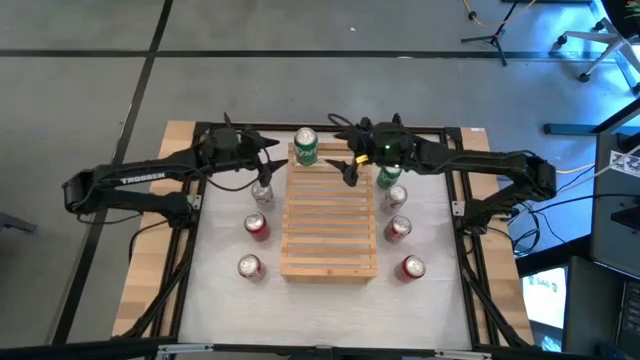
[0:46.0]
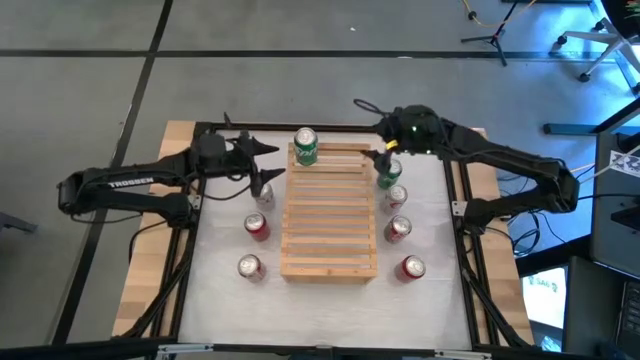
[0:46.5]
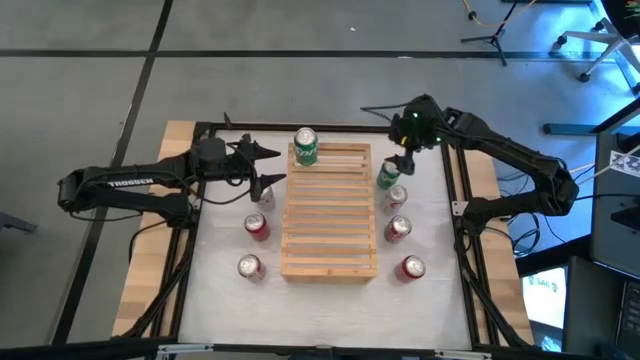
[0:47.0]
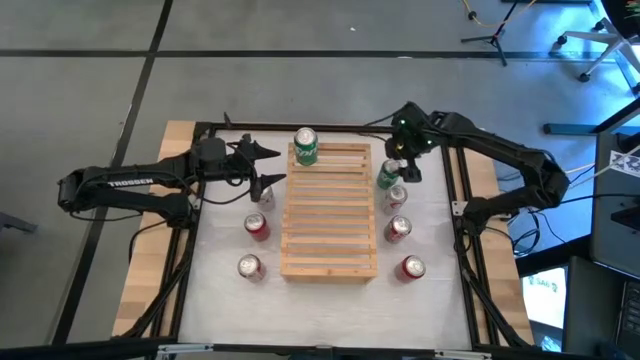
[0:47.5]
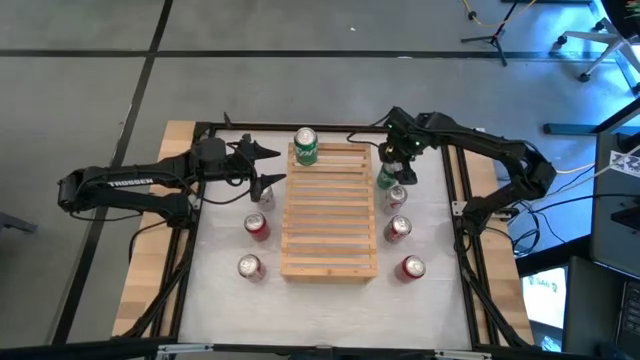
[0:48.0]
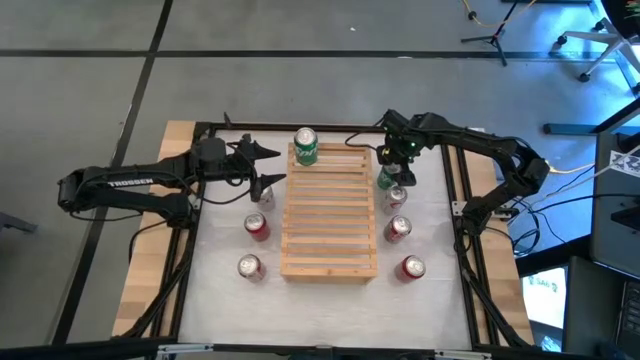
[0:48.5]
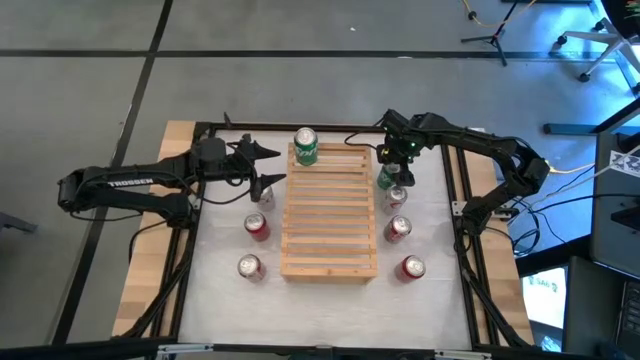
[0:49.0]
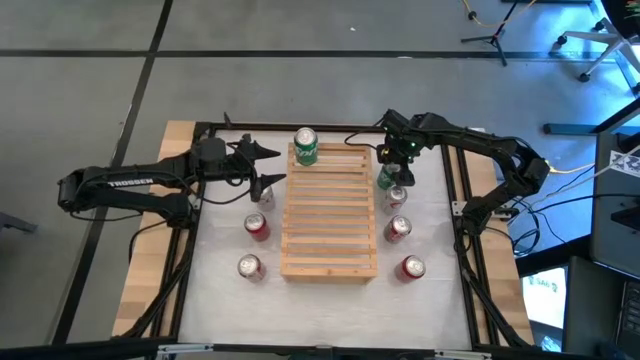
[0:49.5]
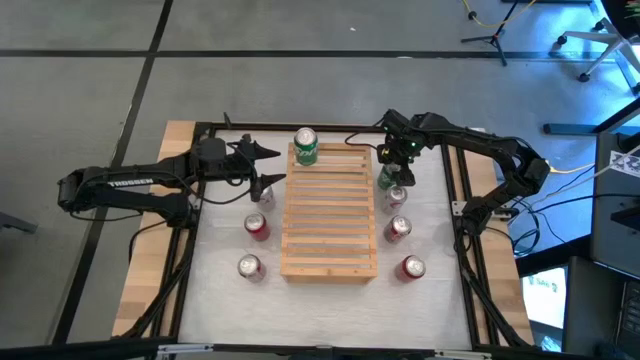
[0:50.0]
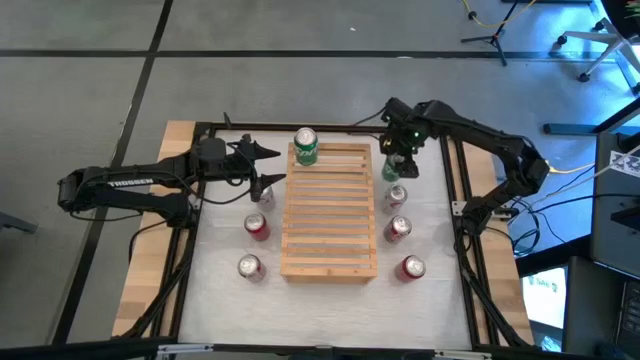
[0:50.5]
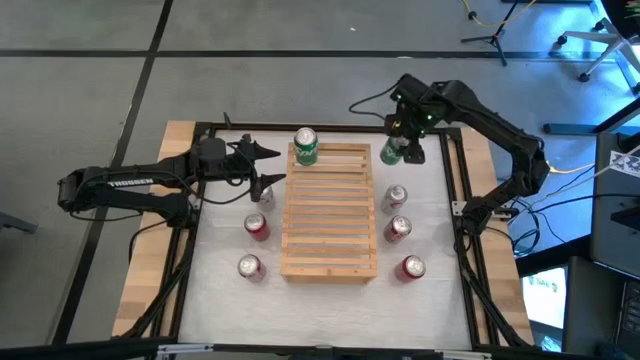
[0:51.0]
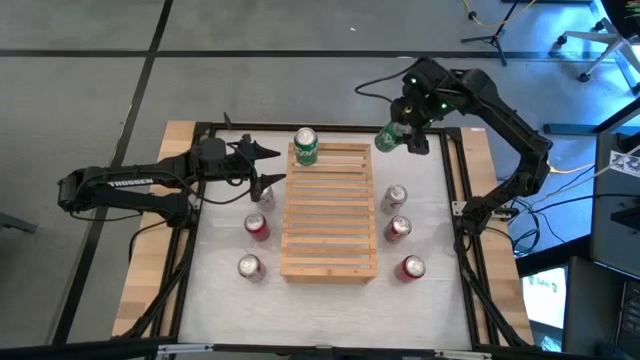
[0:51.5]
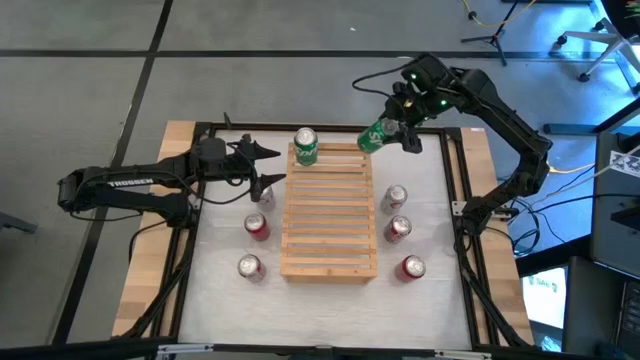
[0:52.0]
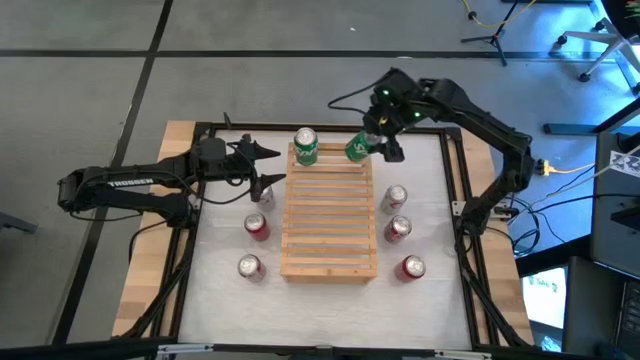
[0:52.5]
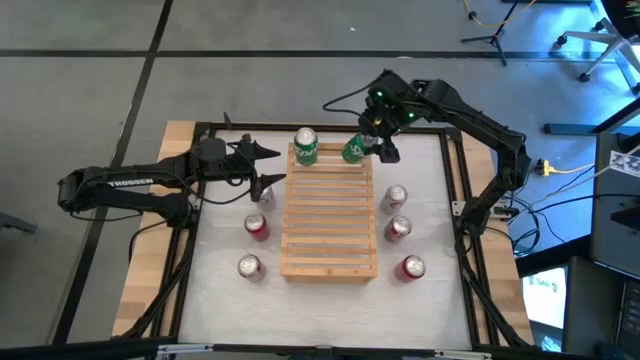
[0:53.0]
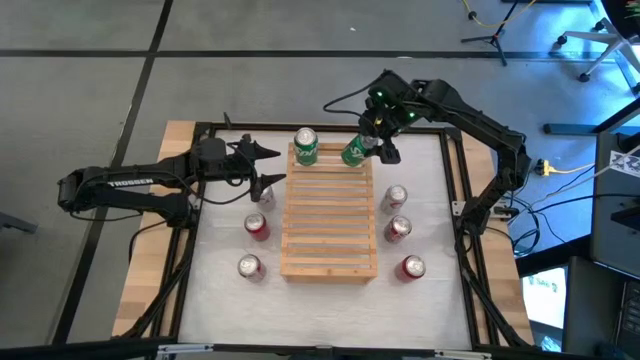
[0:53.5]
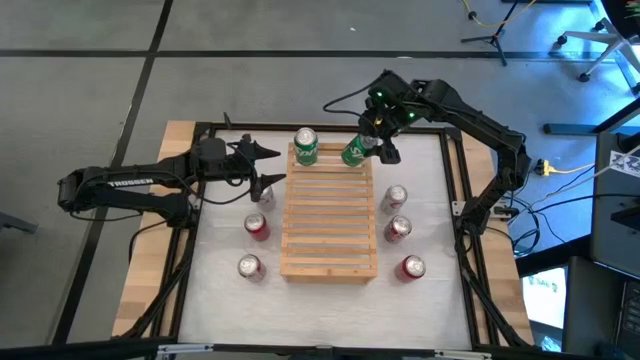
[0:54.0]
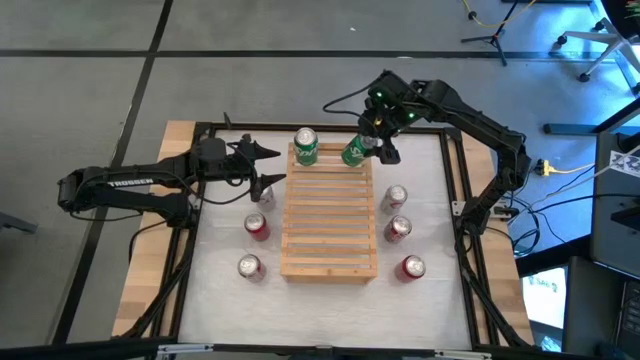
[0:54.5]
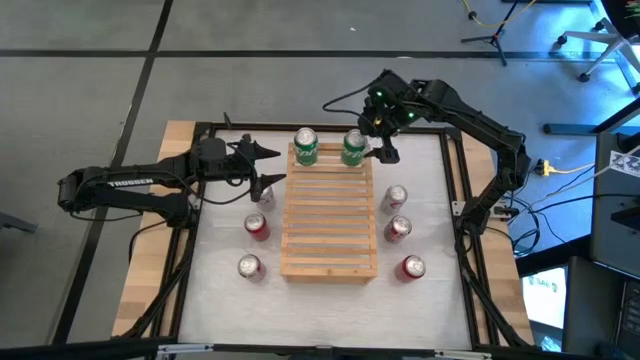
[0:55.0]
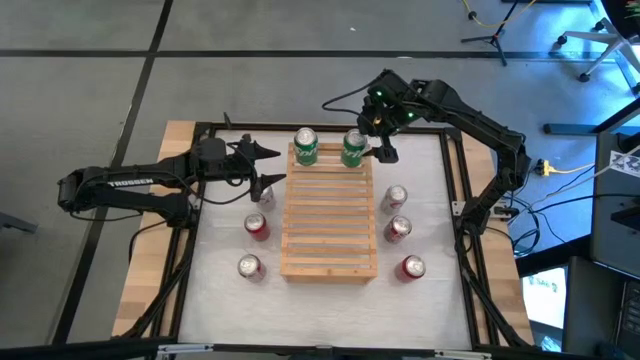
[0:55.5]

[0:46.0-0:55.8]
Task: Place canned beverage on shelf
Put the green soda can on the shelf aligned with the green soda can

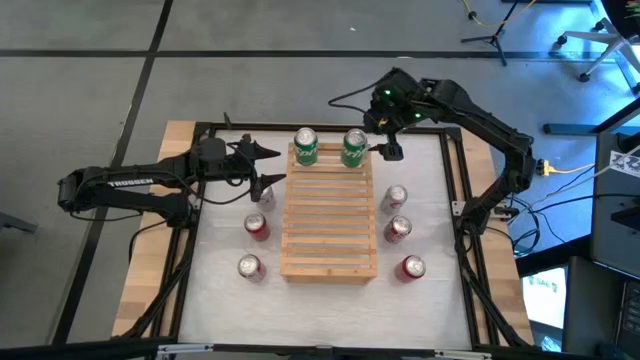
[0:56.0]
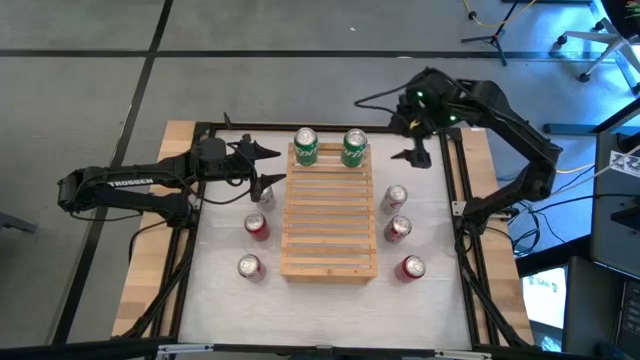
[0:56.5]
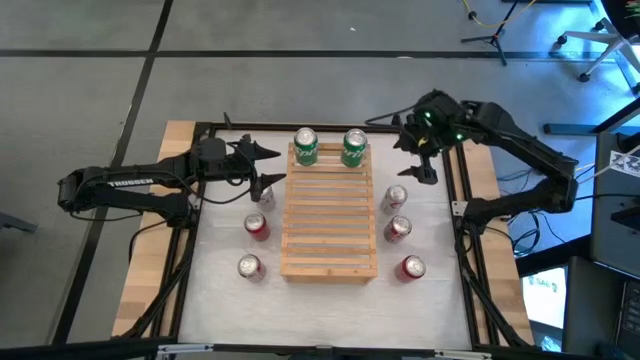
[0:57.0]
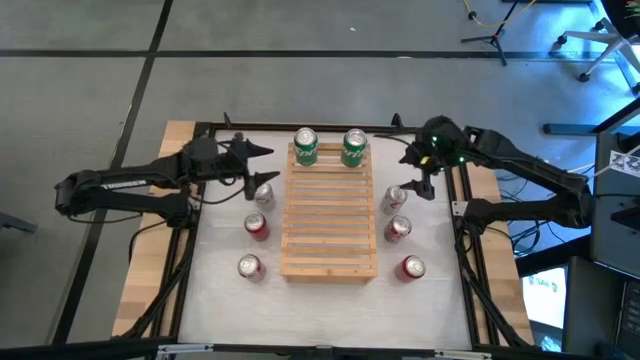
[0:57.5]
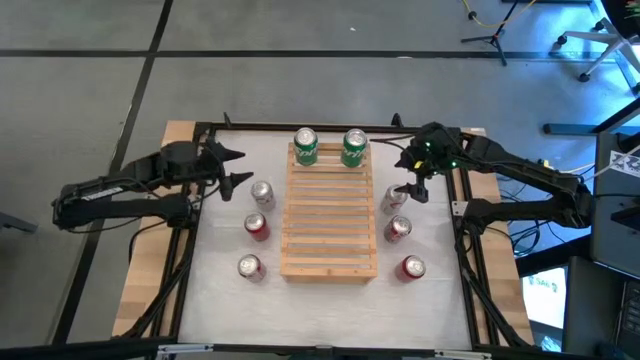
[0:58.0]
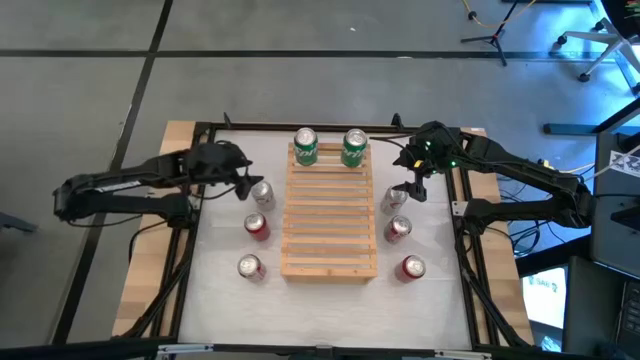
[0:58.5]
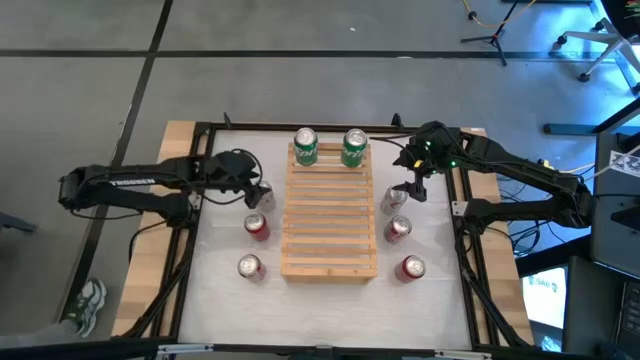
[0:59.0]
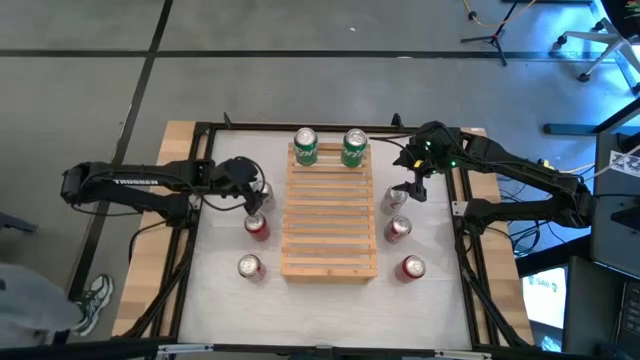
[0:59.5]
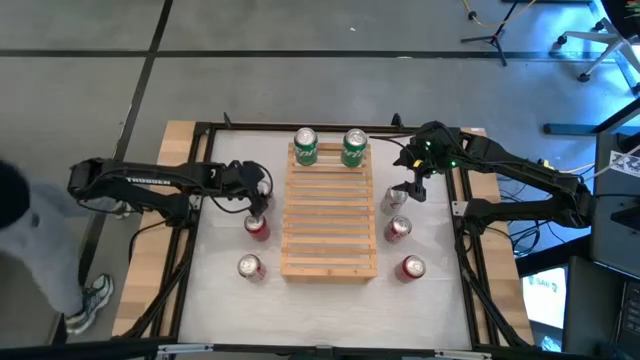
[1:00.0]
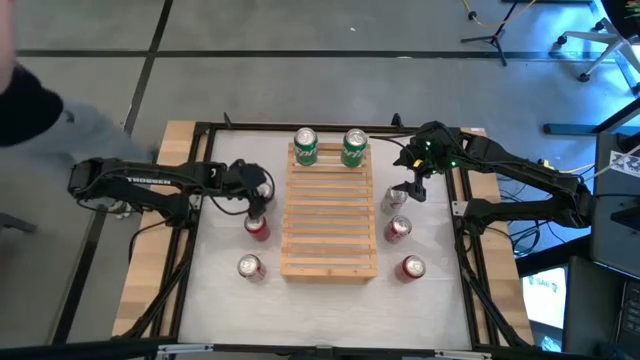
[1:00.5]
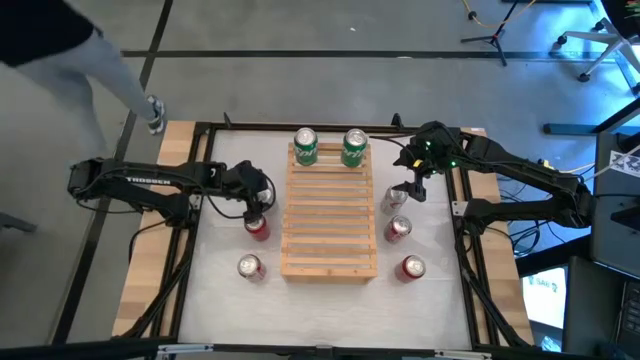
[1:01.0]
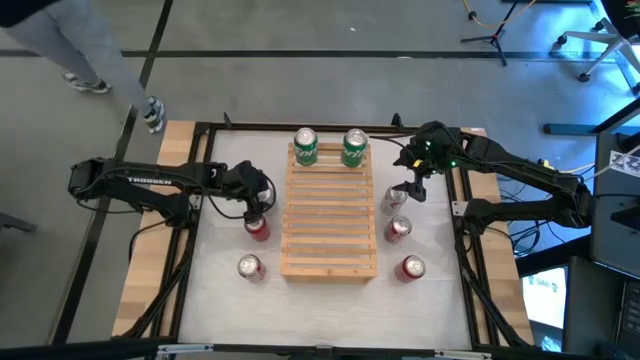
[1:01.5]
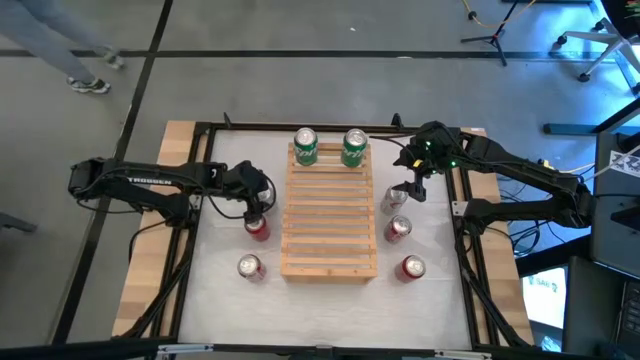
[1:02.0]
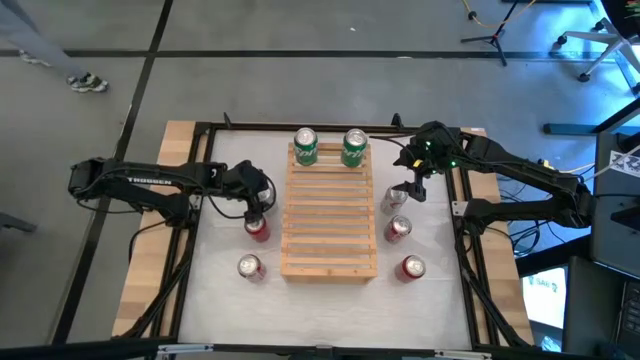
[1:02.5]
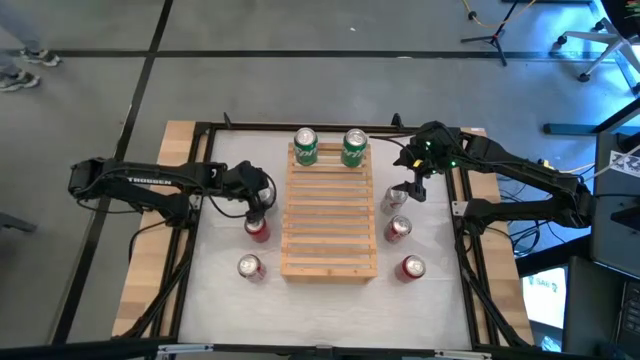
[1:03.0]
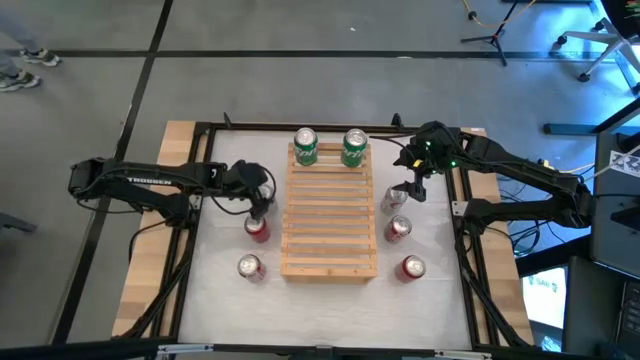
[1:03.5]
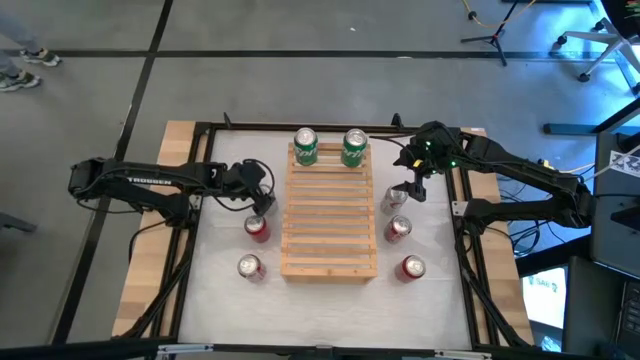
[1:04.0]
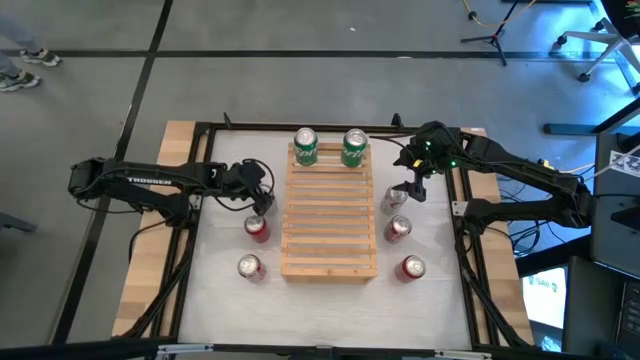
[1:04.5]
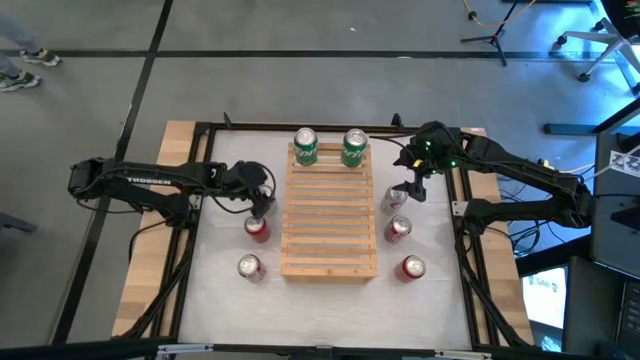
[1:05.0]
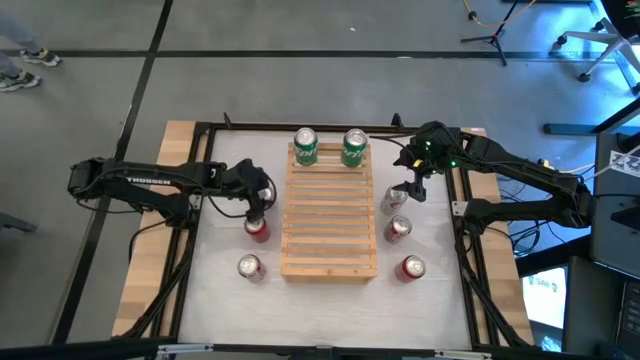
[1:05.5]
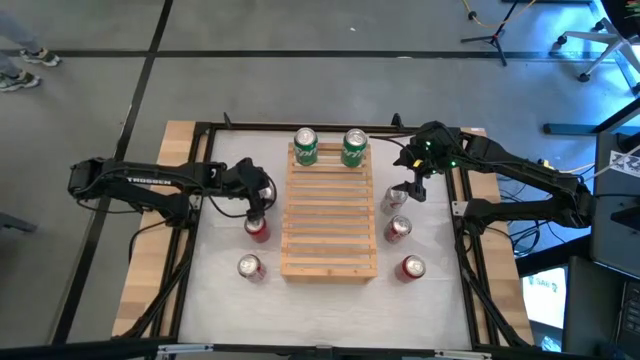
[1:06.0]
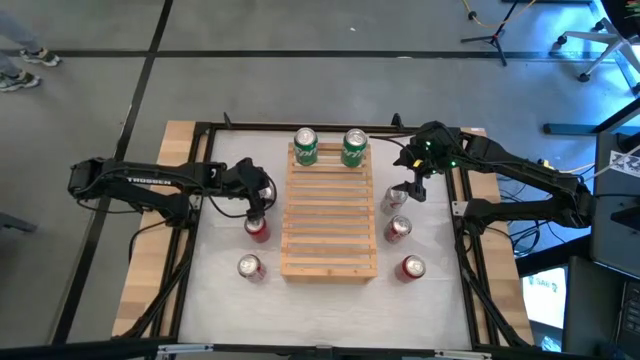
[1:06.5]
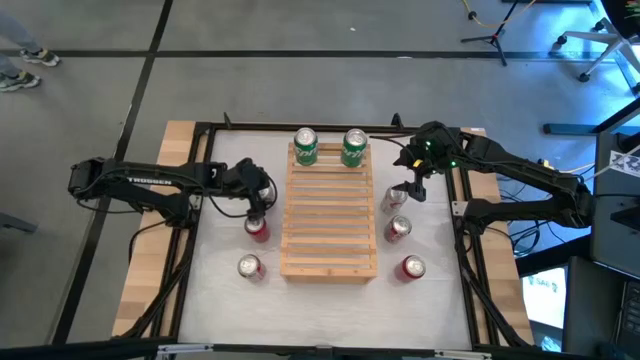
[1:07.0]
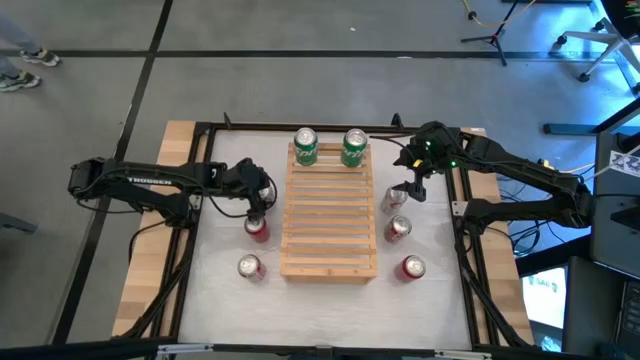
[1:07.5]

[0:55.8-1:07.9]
Put the left red and silver soda can on the shelf
